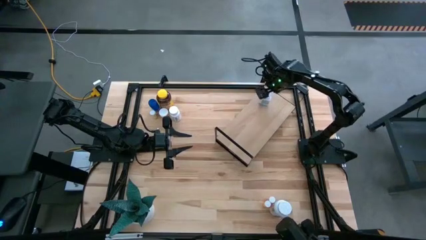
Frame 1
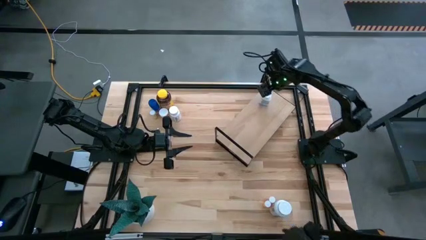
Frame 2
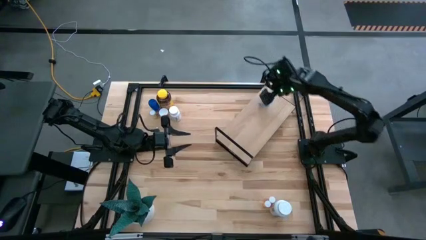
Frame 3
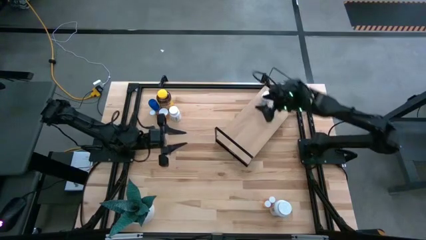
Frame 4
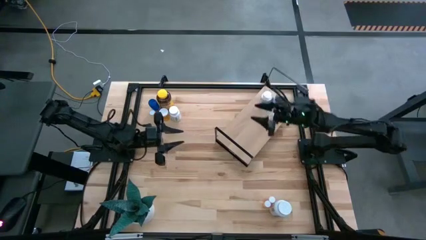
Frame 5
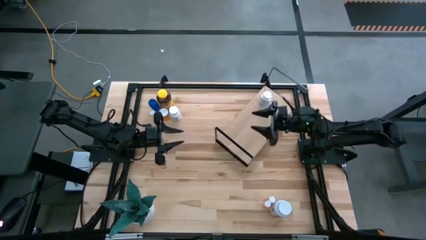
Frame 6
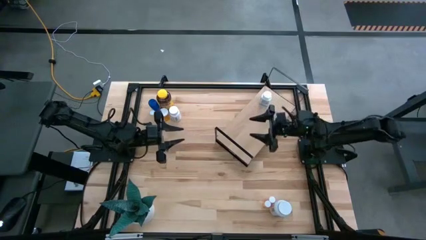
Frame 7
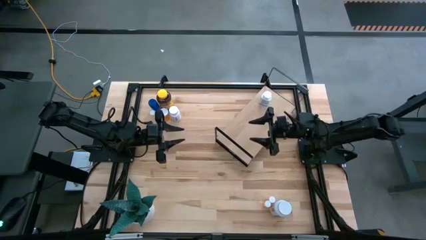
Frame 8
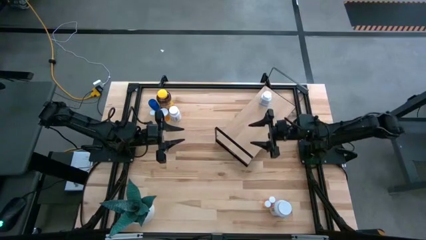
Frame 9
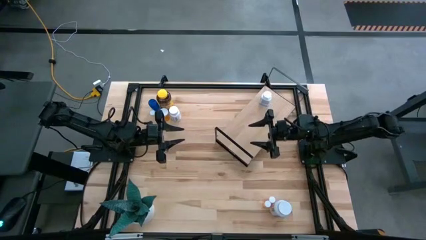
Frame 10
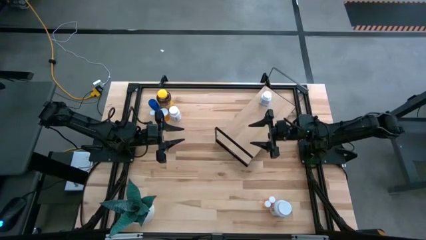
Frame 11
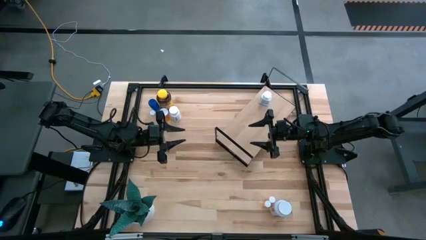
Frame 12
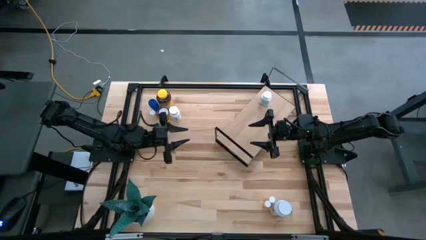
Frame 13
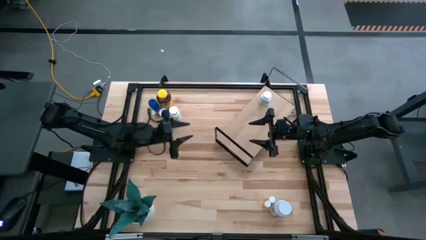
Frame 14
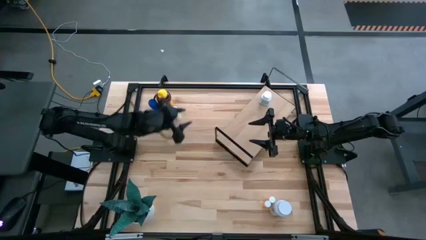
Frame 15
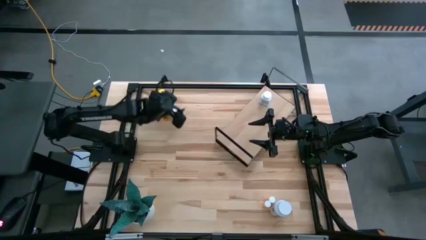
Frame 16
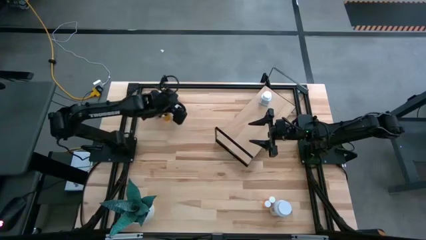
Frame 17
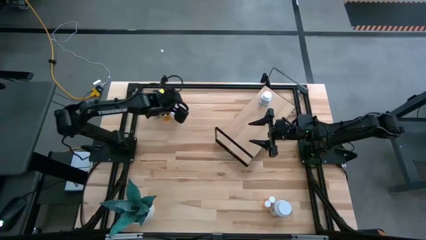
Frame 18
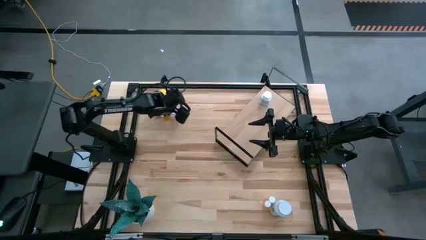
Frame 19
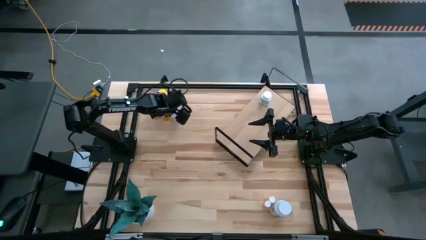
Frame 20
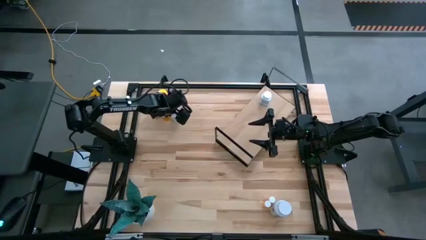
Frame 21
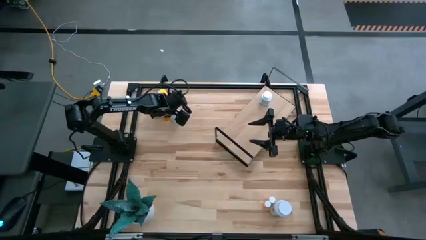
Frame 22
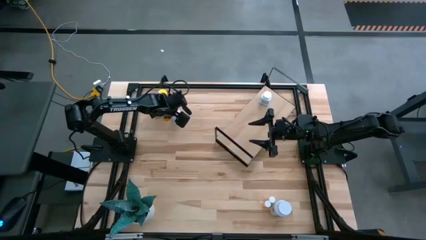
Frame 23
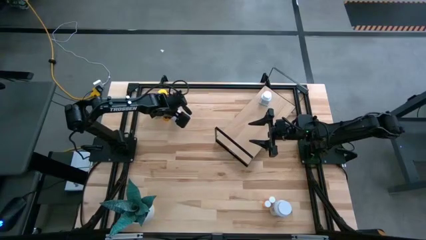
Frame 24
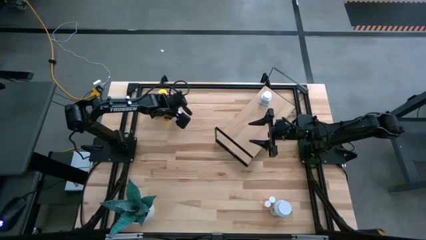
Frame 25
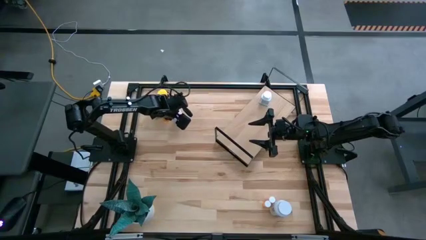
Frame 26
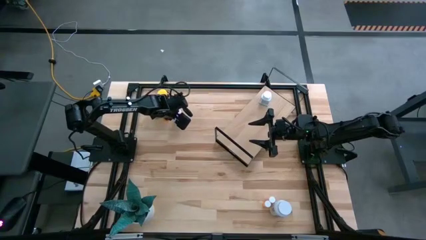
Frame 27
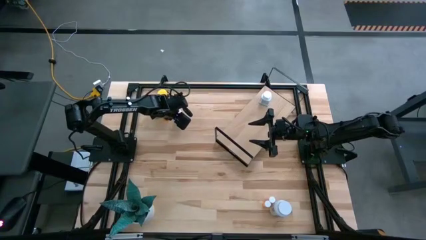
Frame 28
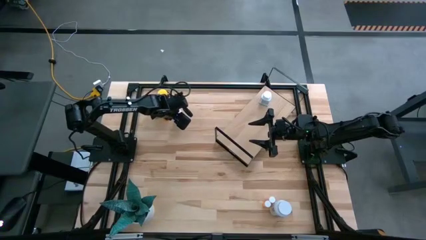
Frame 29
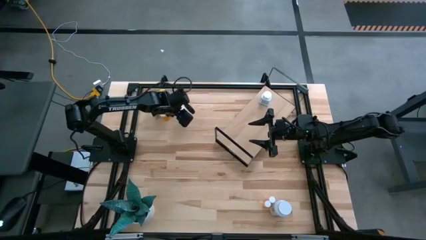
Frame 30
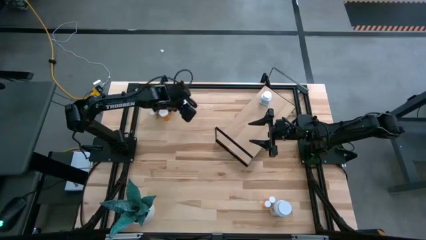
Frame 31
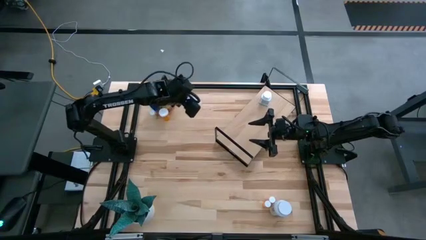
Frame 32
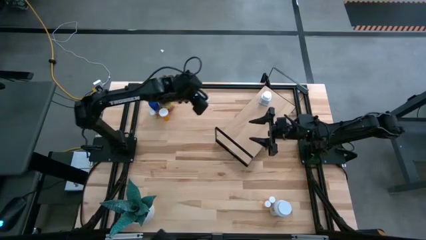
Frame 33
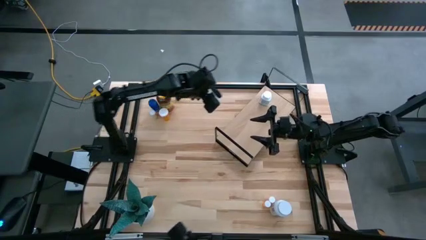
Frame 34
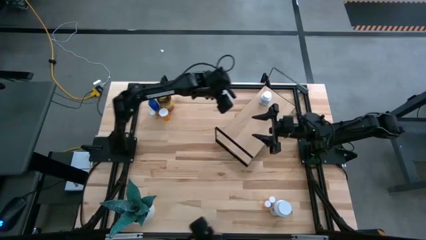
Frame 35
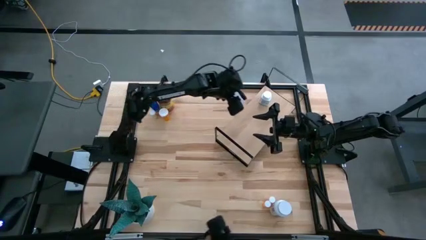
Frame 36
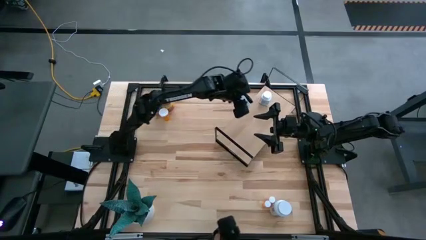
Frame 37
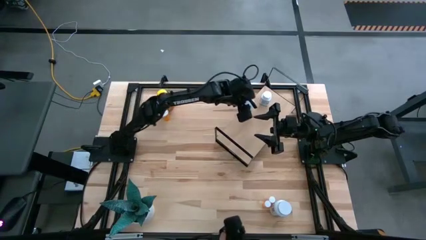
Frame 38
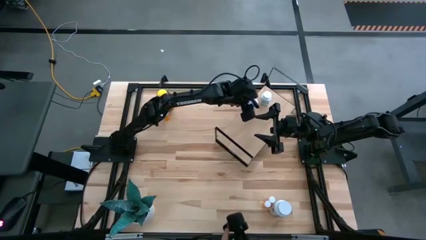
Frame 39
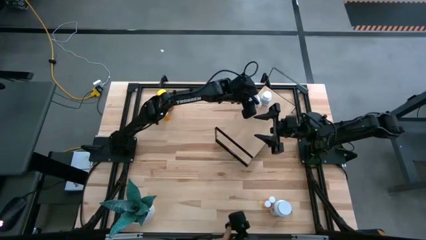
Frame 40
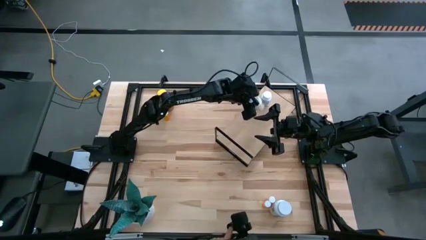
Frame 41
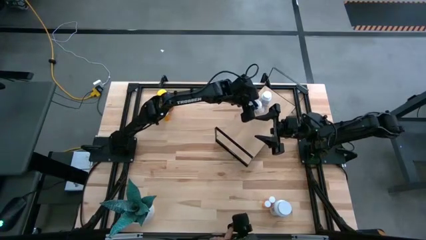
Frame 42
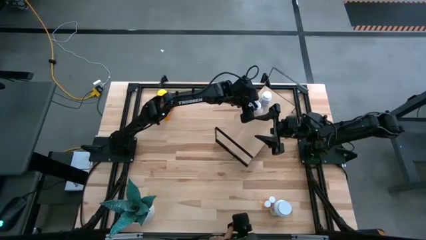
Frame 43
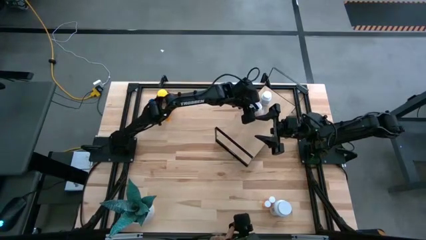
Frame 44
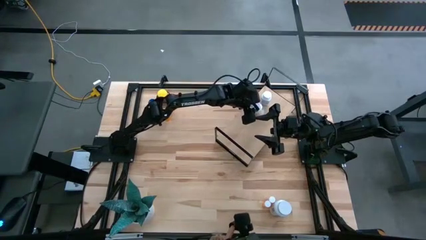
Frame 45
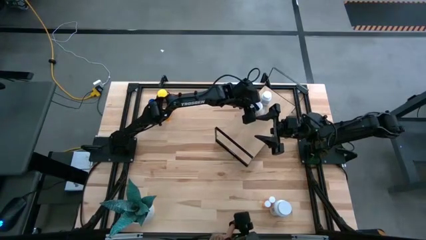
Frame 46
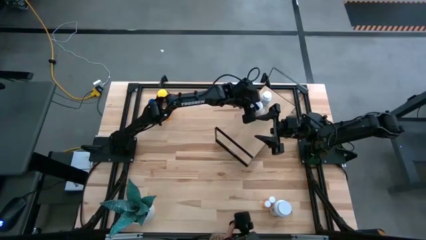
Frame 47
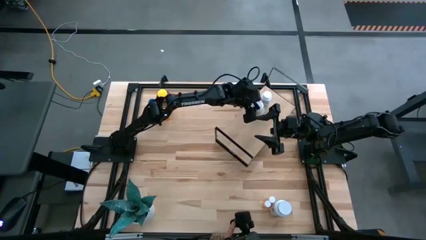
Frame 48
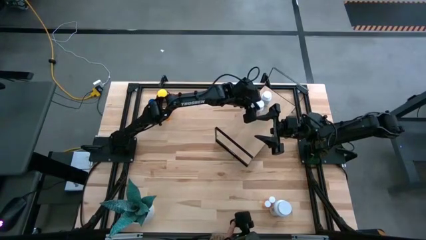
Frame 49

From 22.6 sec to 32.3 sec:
Task: Pick and place medicine bottles onto shelf by color
Put the white medicine bottle on the shelf

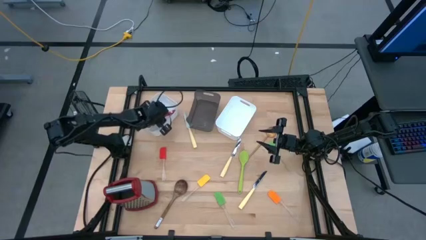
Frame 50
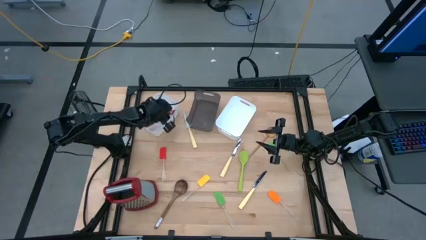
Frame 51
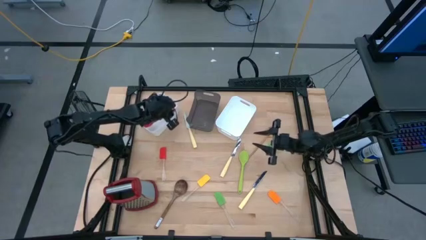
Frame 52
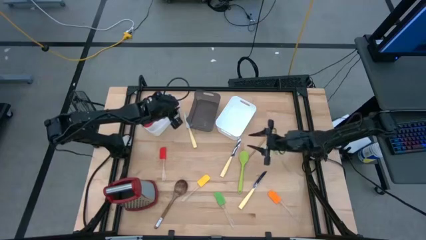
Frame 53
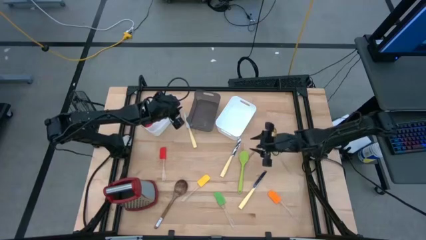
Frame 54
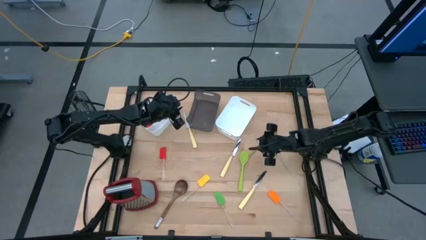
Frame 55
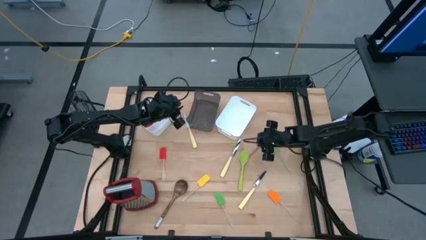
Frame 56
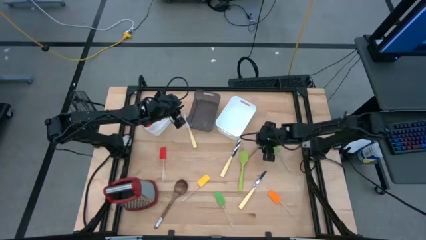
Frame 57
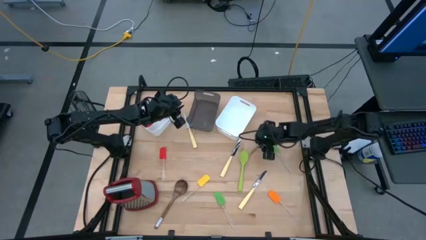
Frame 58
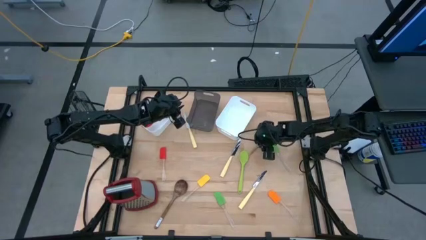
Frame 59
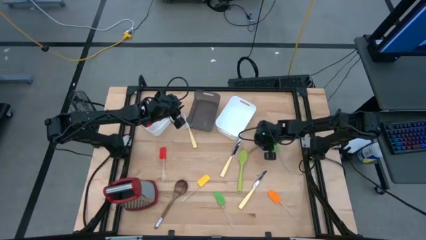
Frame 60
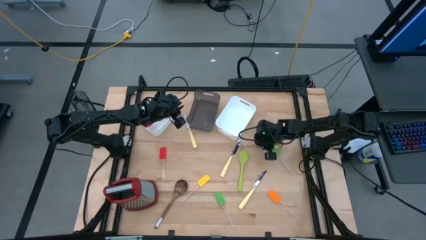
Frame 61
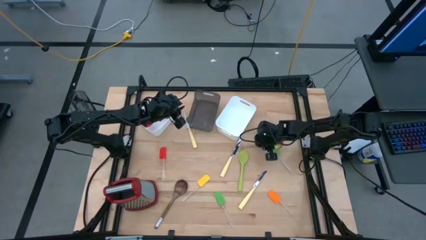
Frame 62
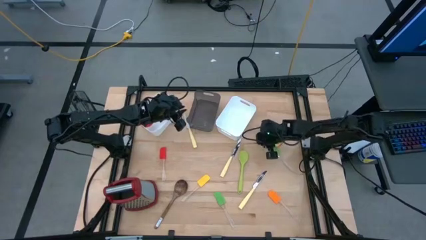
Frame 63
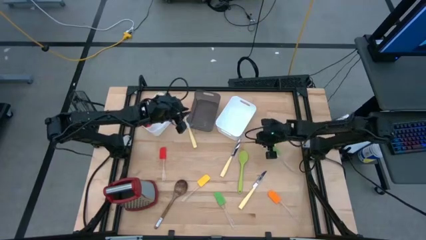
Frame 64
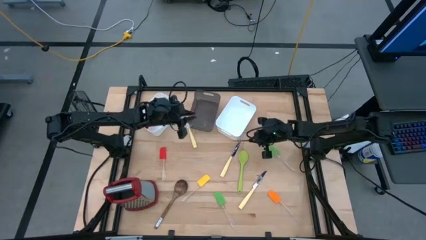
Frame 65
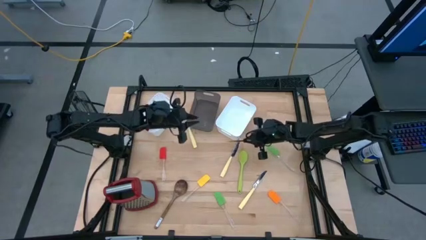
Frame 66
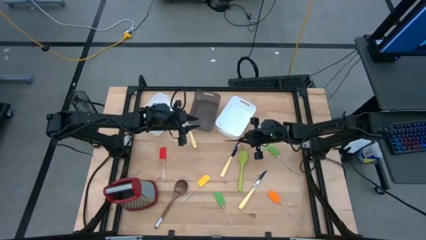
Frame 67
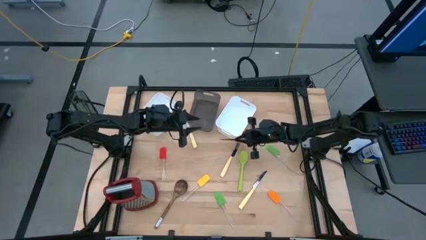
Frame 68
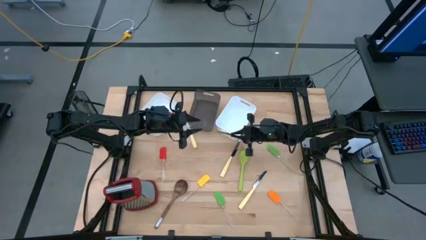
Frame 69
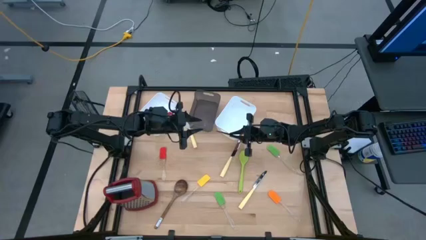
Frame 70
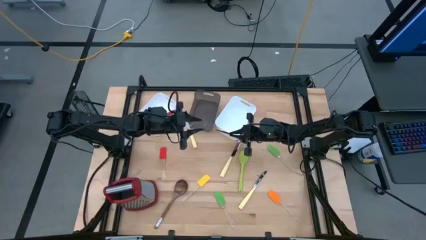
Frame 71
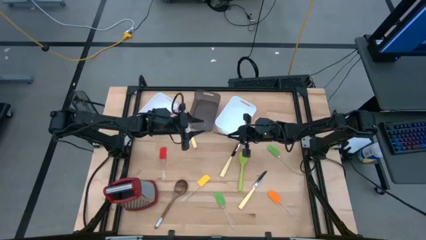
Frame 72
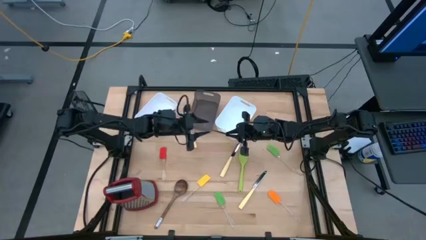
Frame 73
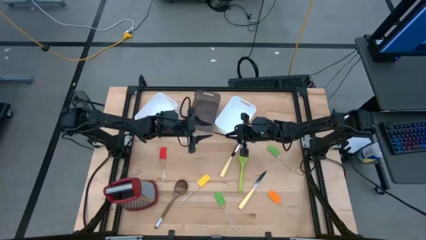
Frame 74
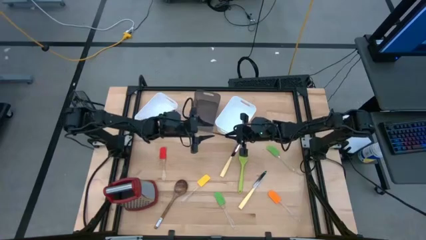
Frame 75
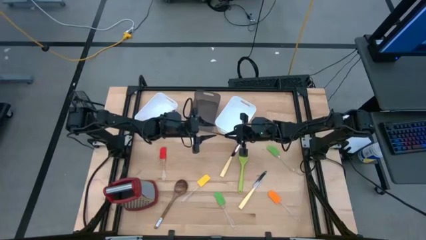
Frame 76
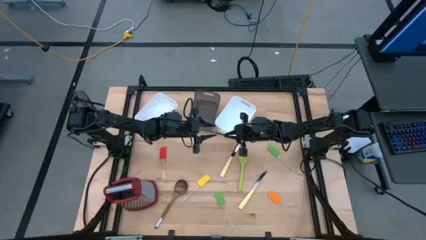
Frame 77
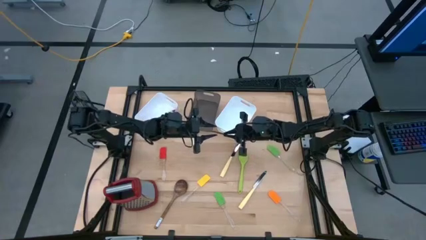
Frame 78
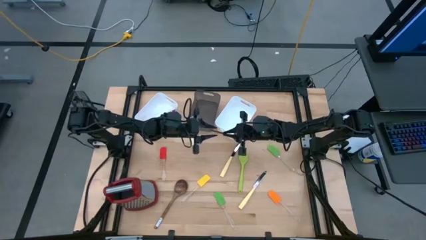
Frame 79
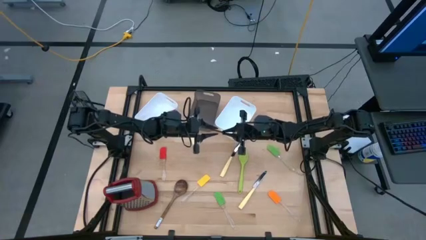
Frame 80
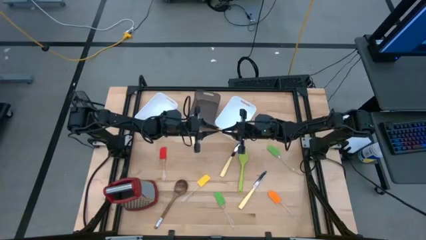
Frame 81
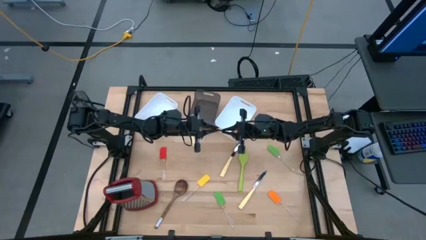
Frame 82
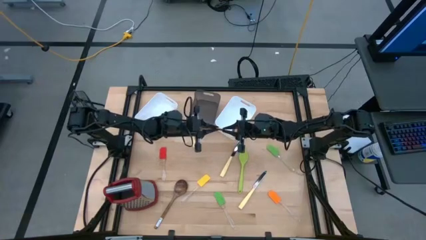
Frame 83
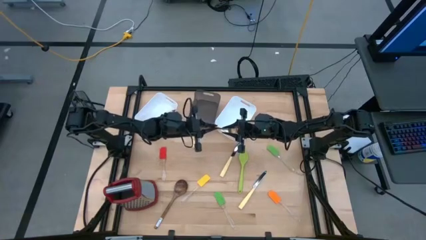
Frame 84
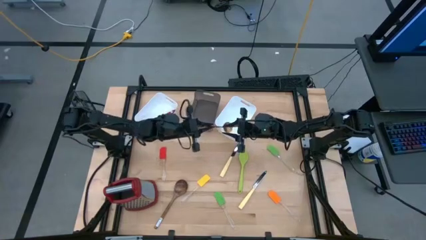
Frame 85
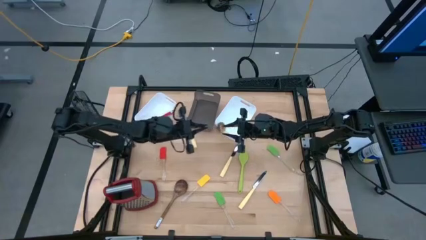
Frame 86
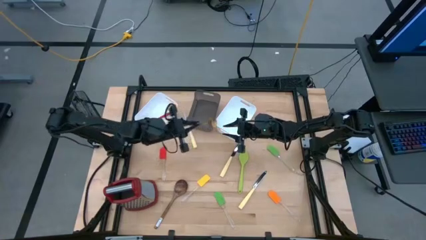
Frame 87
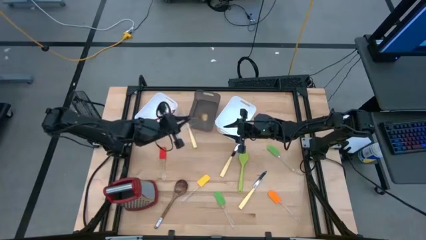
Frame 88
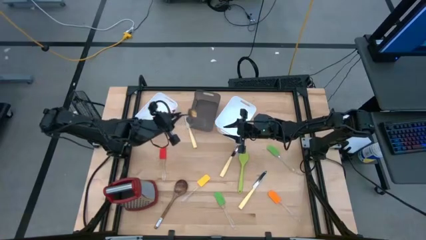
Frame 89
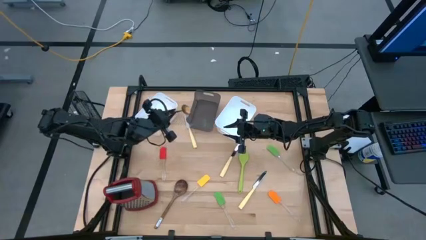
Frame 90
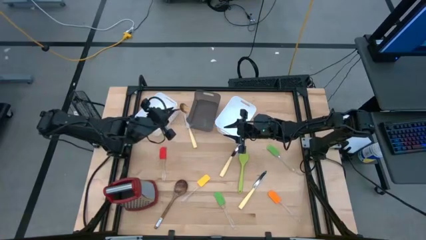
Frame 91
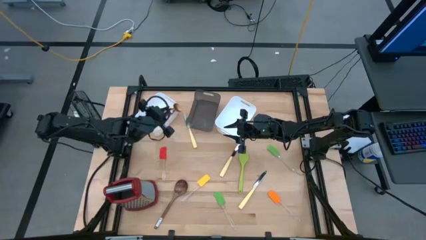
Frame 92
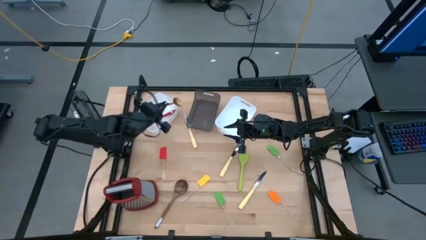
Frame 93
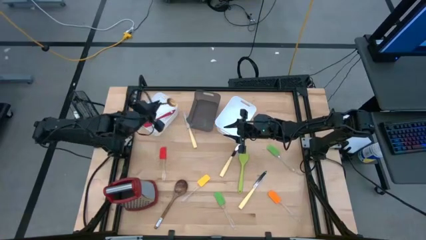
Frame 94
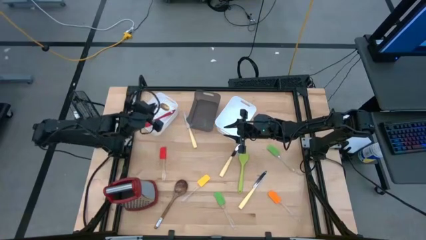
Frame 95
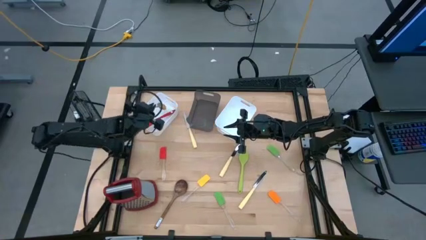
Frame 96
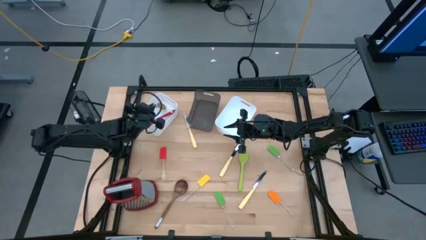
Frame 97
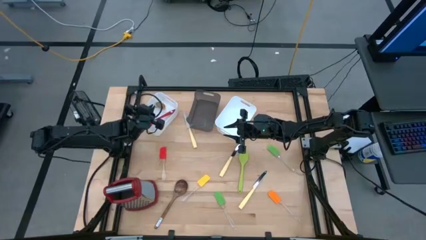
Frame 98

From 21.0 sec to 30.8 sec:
Task: Pick & Place Kitchen Items
Put the gold serving spoon into the left white bin
